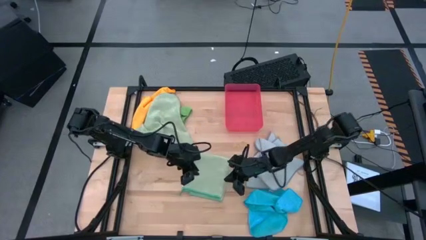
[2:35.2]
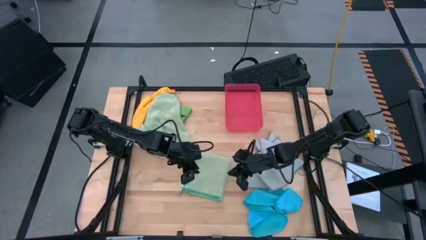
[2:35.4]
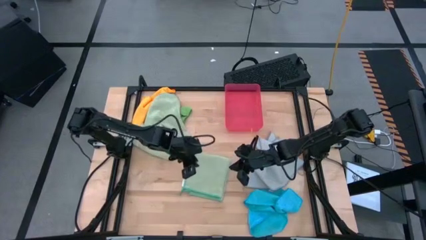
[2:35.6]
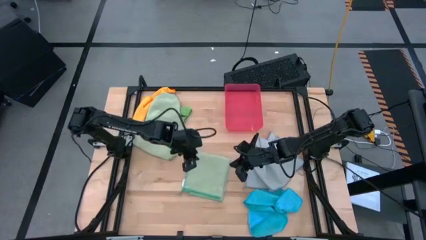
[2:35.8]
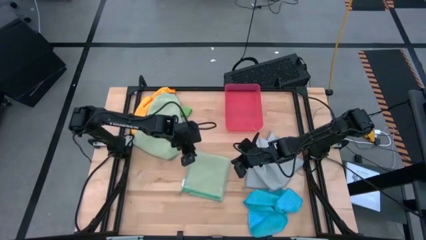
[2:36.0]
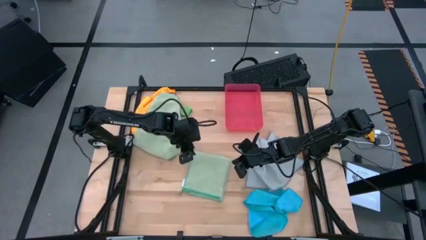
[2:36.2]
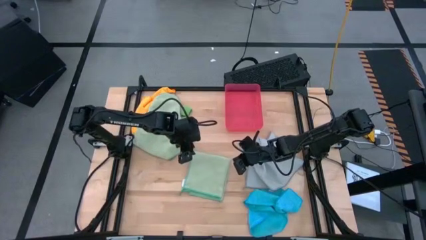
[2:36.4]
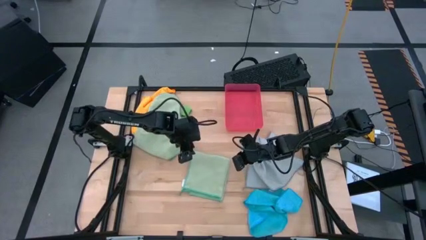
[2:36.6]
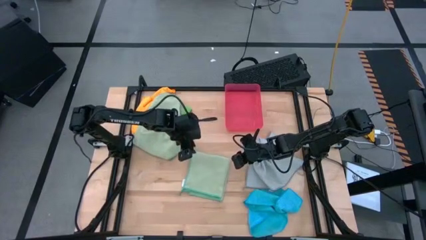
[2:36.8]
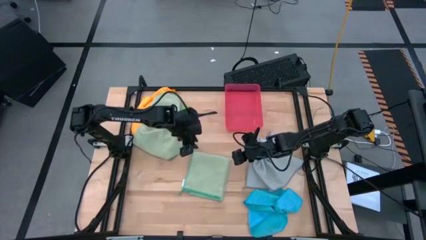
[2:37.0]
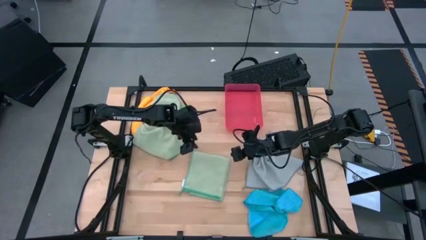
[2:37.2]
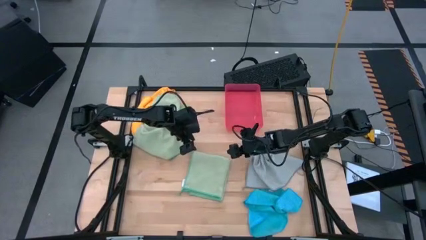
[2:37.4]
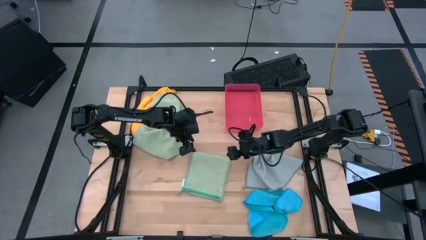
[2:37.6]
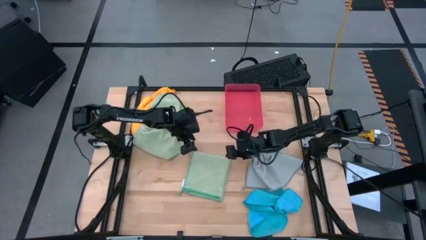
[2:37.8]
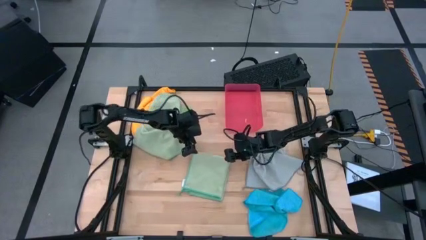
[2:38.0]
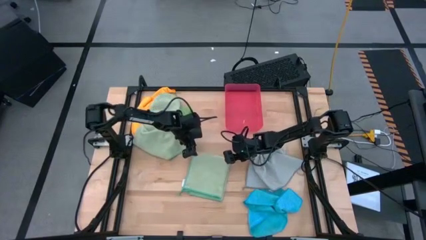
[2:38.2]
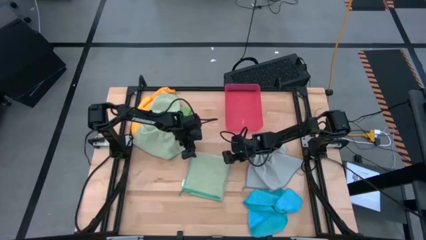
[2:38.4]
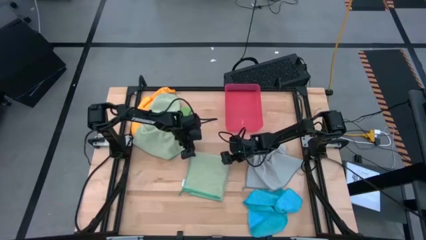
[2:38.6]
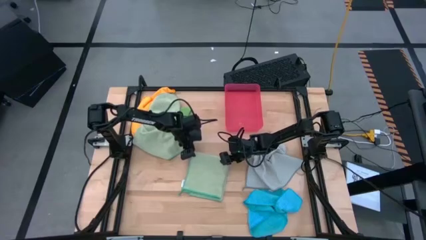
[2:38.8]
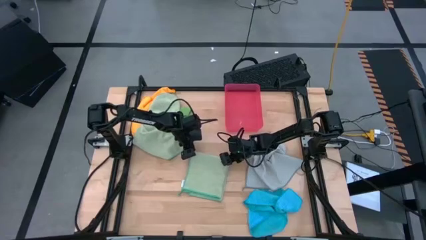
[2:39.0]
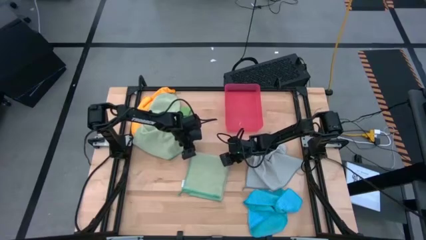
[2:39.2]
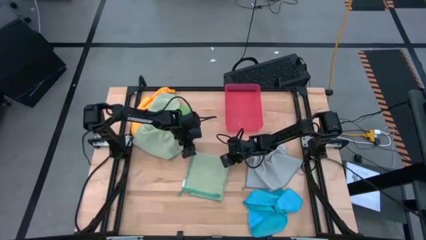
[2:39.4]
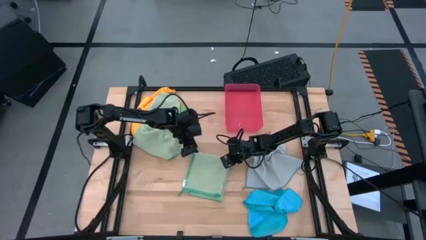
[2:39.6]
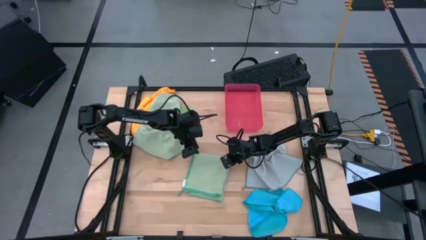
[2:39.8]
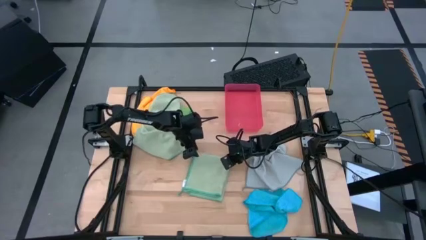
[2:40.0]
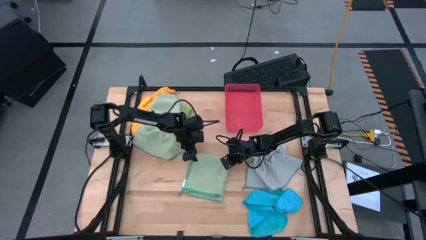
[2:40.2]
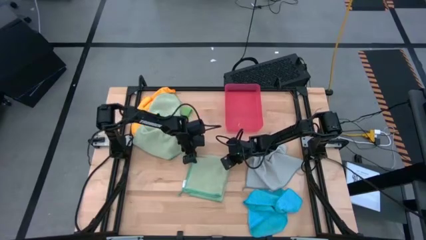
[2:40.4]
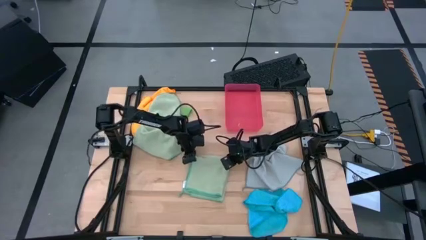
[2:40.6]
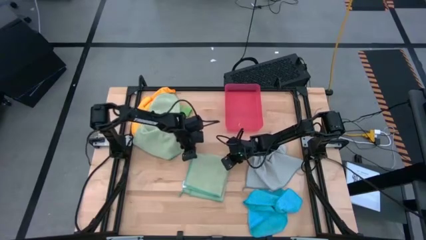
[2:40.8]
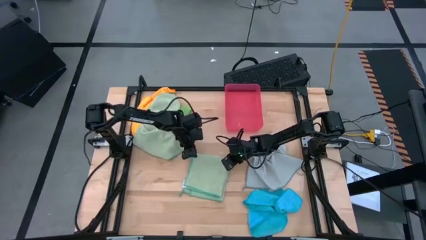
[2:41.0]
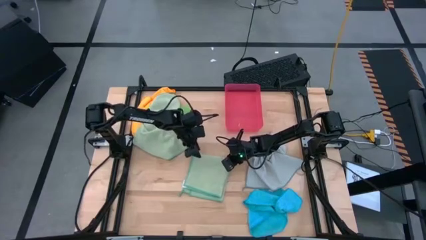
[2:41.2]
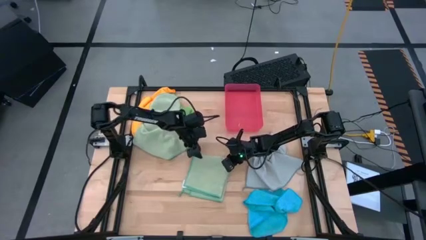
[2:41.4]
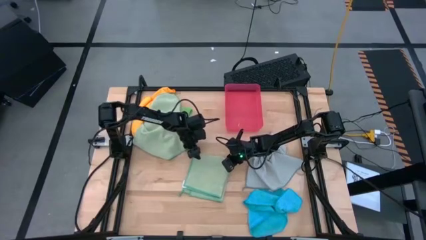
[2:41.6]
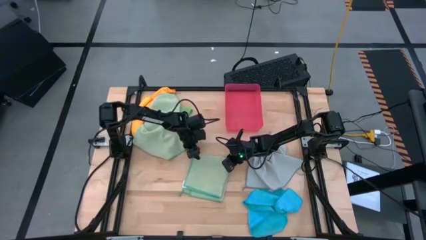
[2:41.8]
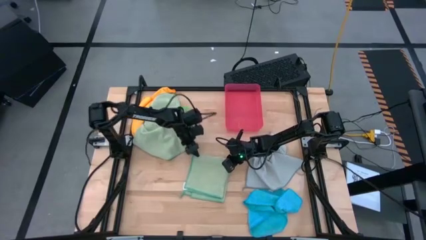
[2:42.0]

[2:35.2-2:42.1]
Task: Fold microfiber towels
Fold the right light green microfiber cloth

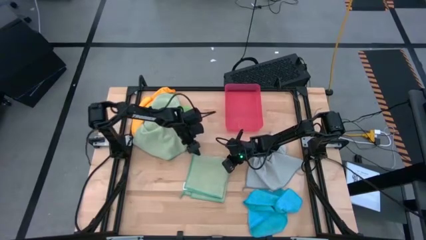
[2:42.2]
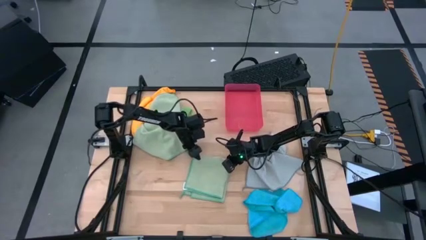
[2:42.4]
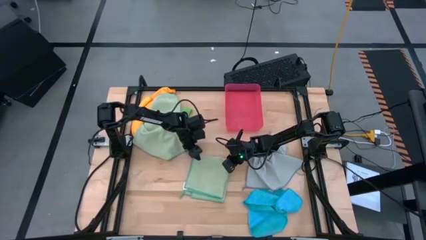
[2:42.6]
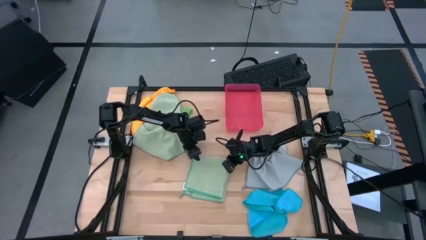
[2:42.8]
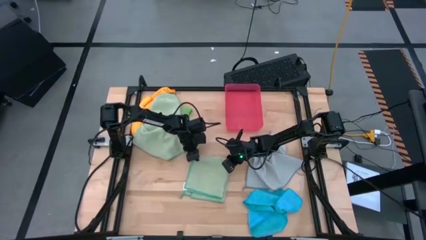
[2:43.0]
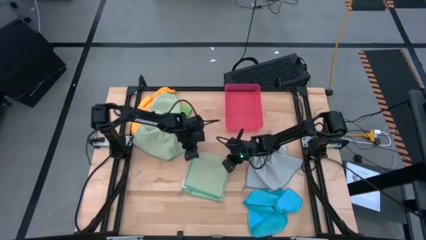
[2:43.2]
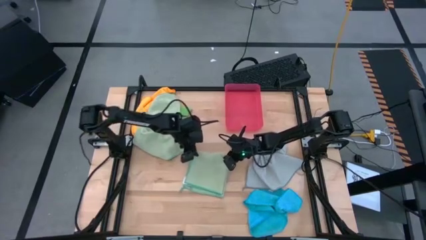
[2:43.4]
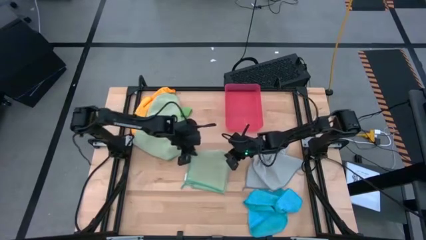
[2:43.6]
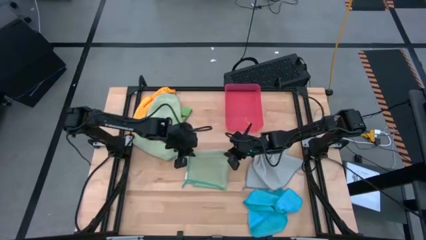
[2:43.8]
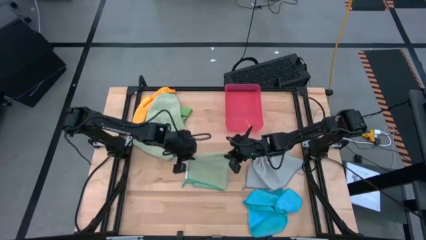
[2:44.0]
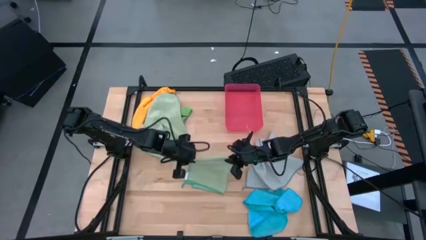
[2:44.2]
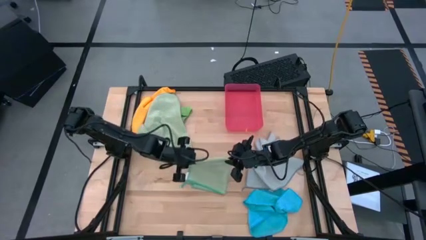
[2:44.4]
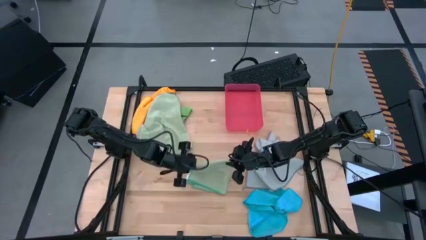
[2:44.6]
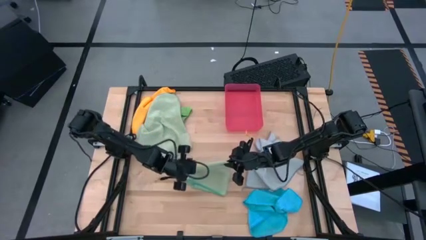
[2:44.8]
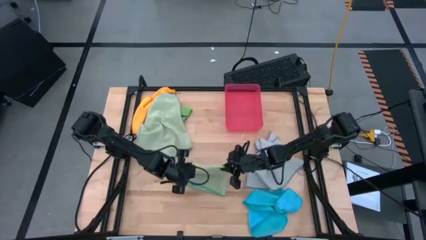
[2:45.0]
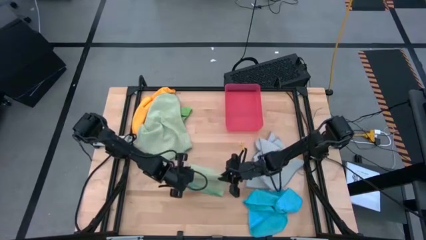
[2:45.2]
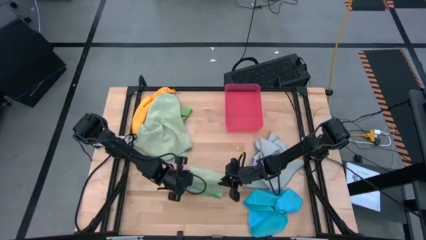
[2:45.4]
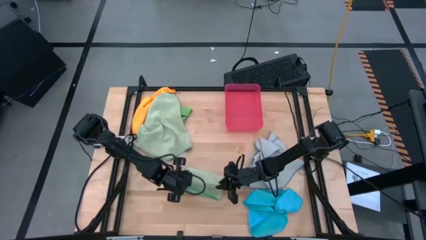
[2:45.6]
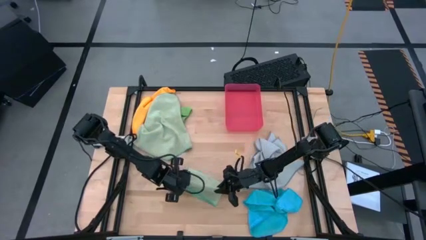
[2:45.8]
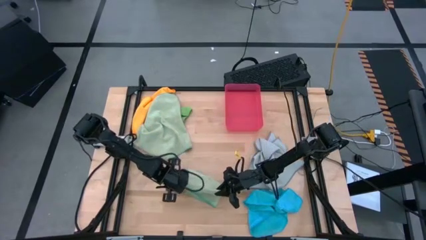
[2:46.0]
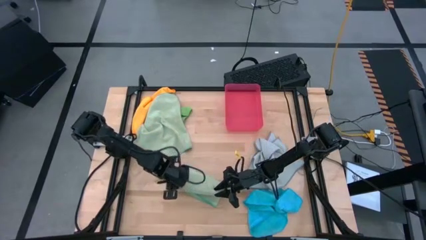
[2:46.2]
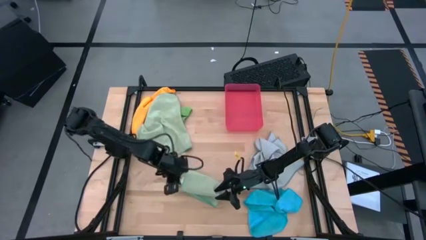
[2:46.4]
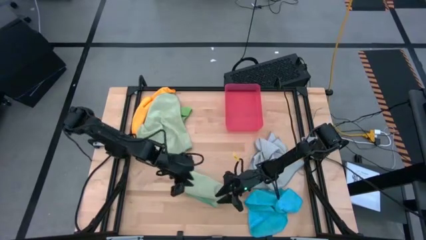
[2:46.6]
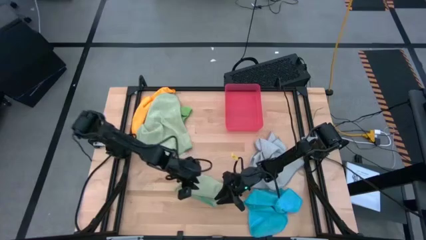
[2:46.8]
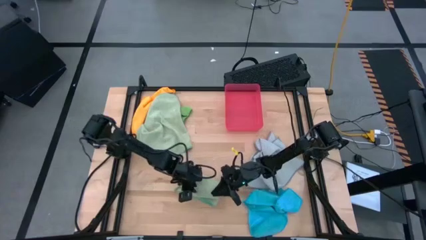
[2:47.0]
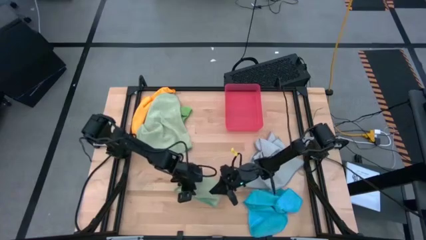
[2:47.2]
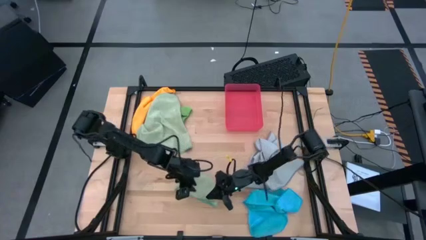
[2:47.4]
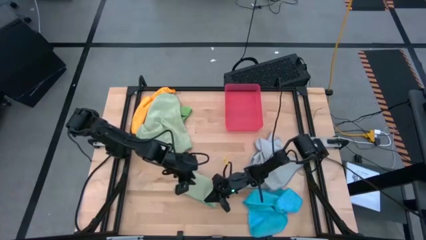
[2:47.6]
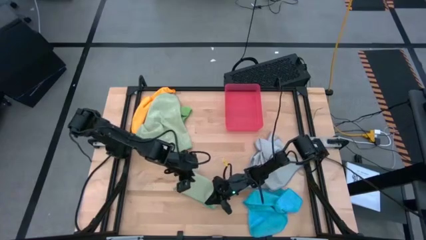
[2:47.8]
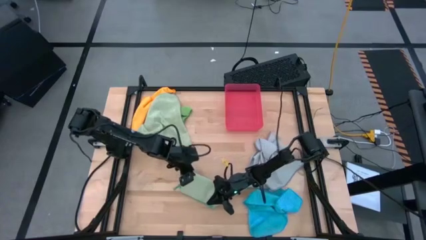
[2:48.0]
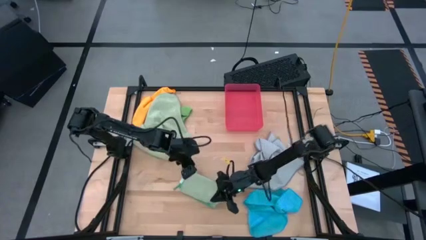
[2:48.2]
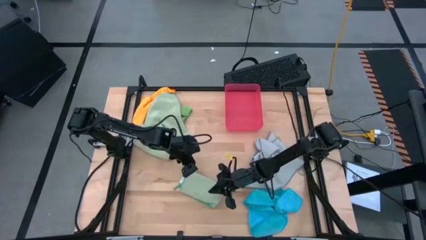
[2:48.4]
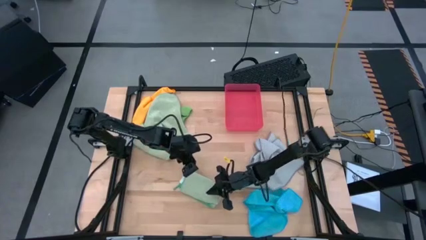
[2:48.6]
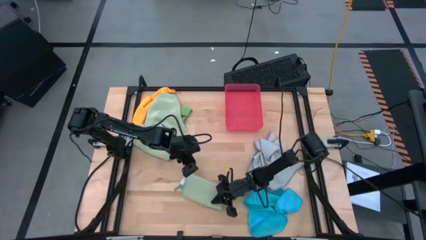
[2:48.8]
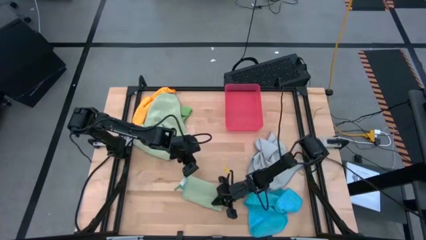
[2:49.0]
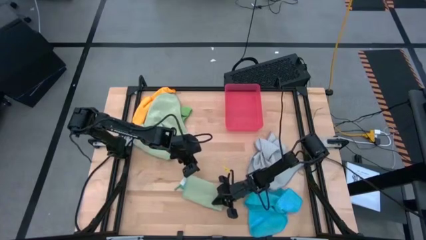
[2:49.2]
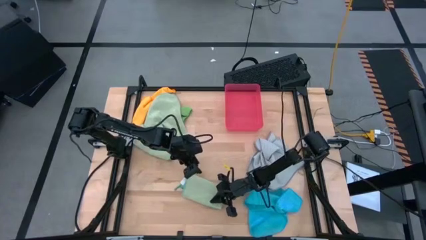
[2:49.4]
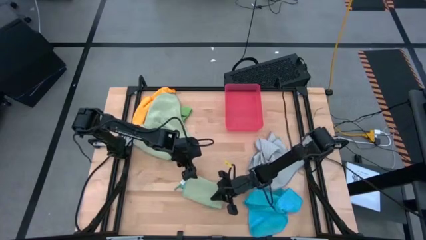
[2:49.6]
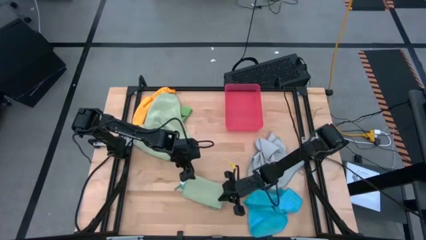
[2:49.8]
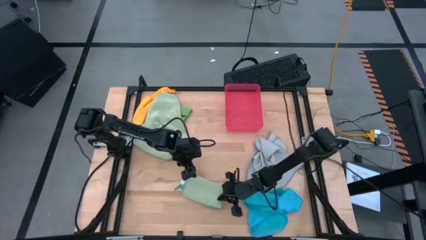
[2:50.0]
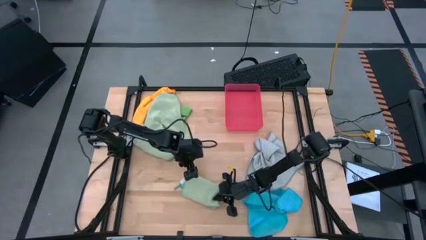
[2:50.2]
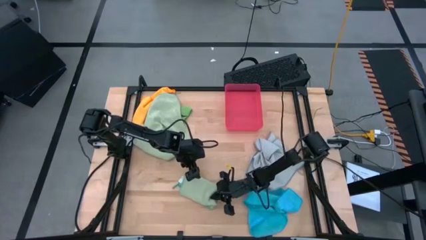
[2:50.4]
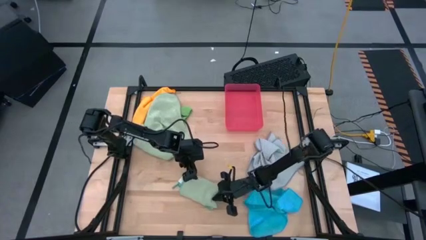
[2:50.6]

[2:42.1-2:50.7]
Fold the right light green microfiber cloth
